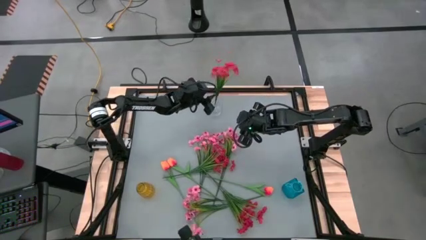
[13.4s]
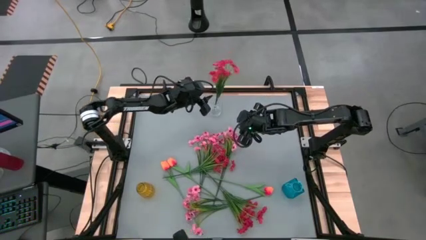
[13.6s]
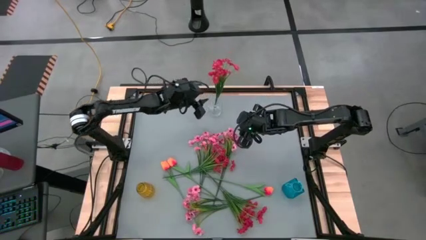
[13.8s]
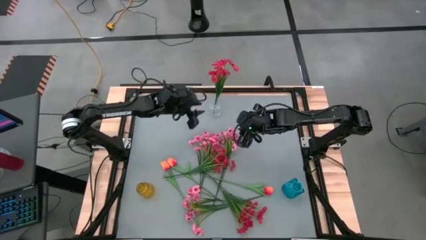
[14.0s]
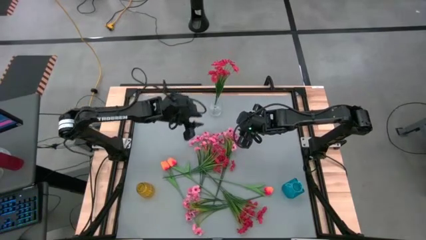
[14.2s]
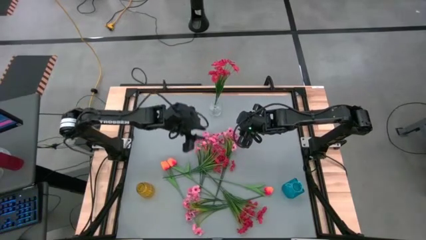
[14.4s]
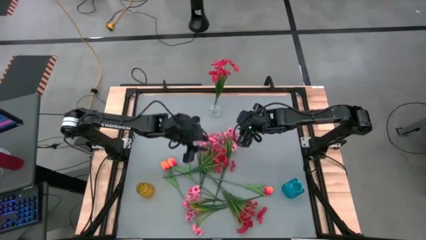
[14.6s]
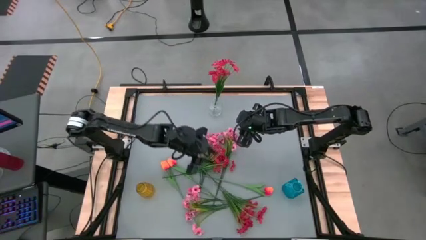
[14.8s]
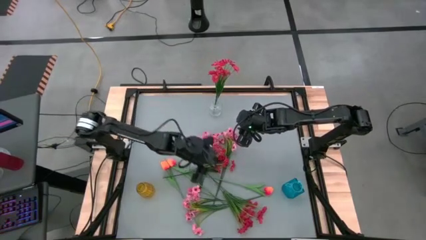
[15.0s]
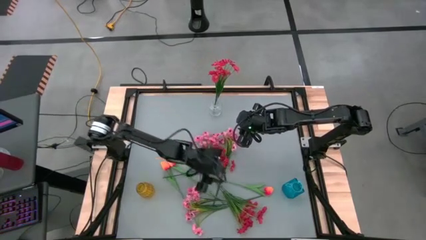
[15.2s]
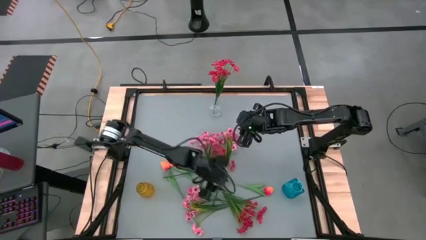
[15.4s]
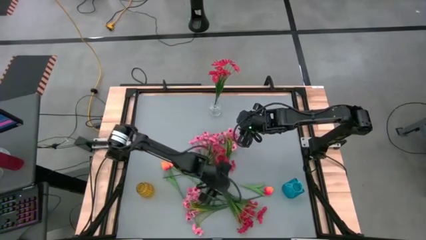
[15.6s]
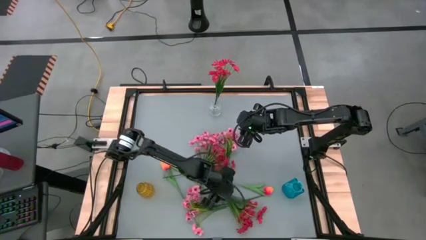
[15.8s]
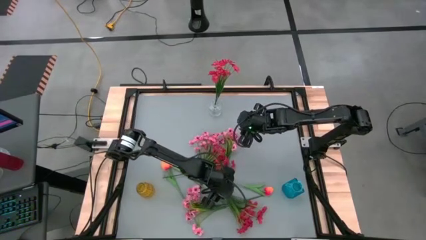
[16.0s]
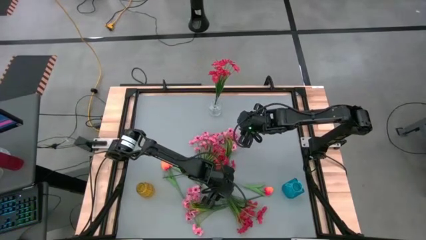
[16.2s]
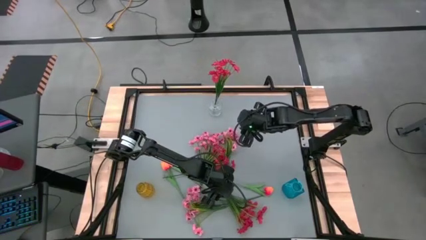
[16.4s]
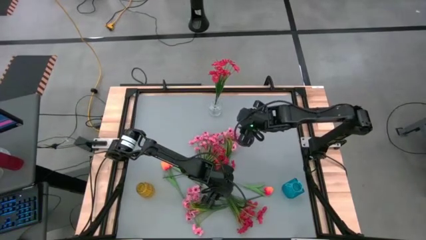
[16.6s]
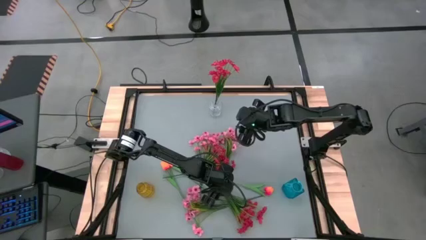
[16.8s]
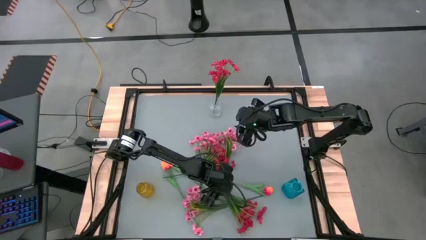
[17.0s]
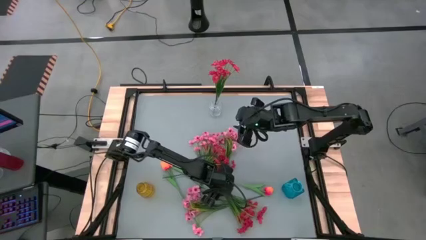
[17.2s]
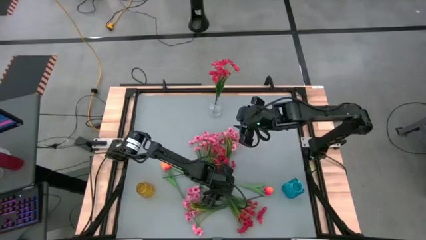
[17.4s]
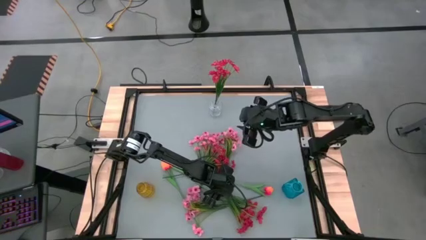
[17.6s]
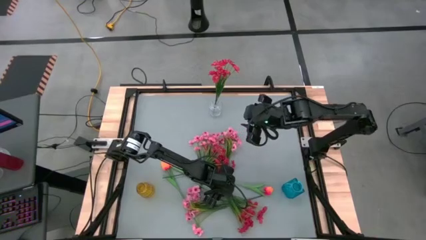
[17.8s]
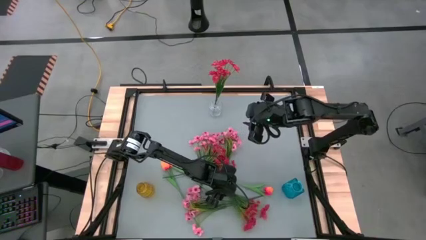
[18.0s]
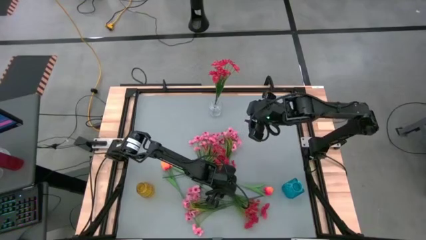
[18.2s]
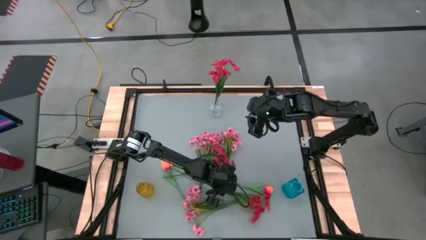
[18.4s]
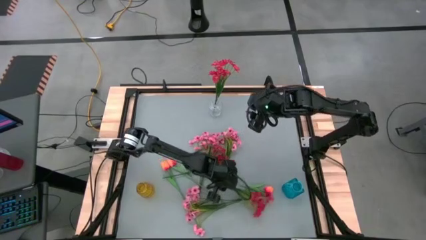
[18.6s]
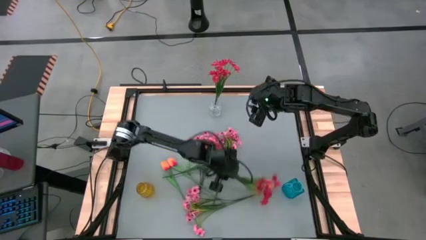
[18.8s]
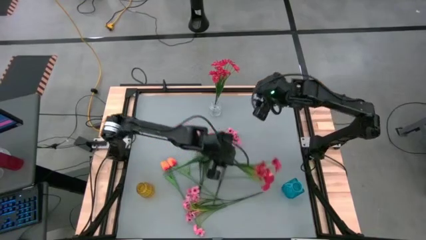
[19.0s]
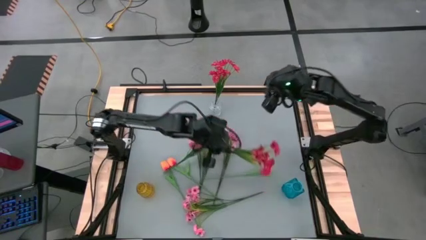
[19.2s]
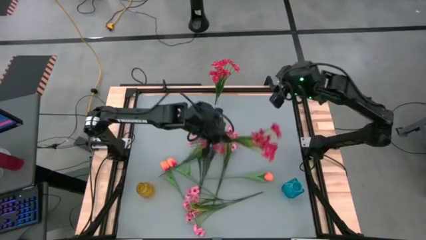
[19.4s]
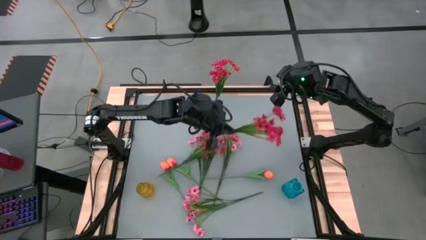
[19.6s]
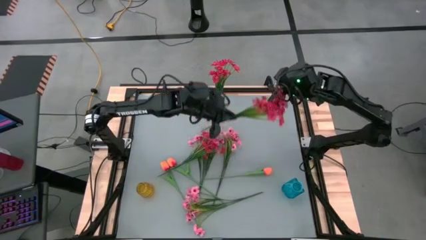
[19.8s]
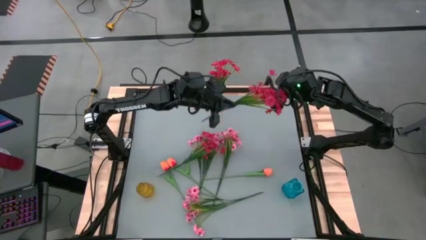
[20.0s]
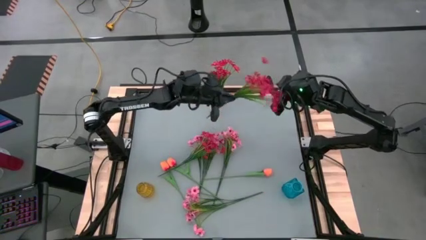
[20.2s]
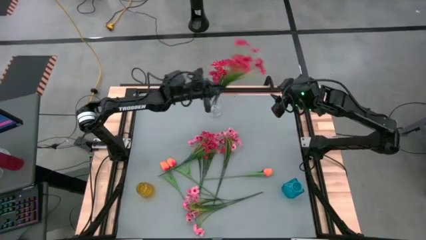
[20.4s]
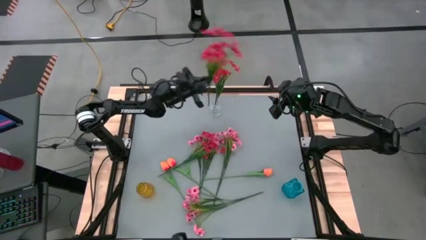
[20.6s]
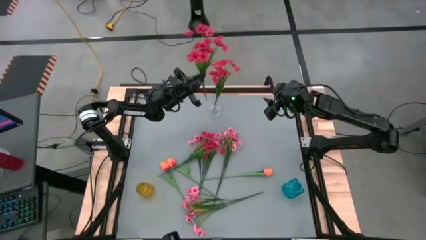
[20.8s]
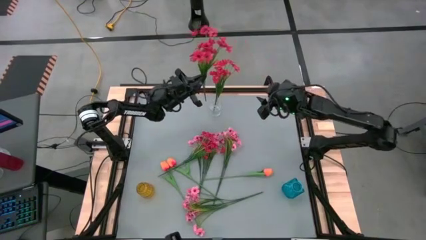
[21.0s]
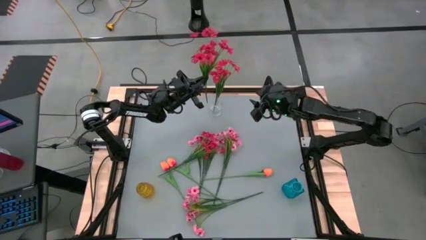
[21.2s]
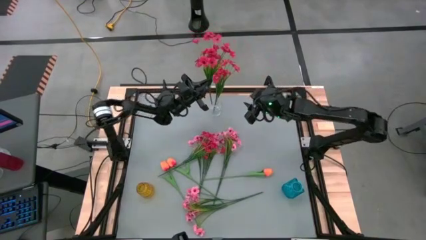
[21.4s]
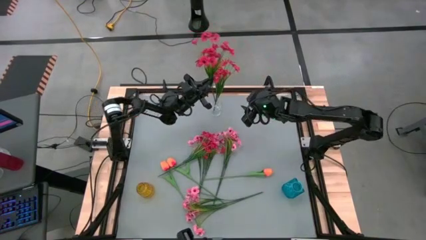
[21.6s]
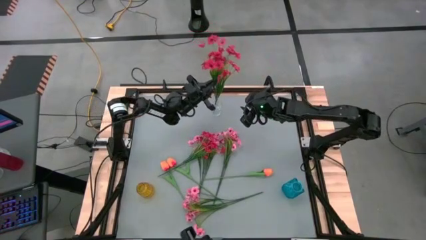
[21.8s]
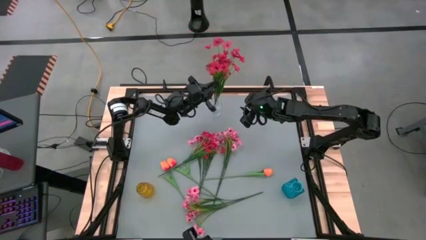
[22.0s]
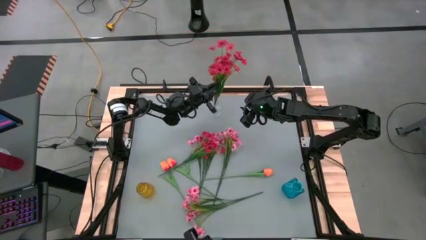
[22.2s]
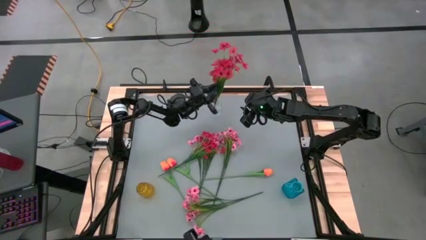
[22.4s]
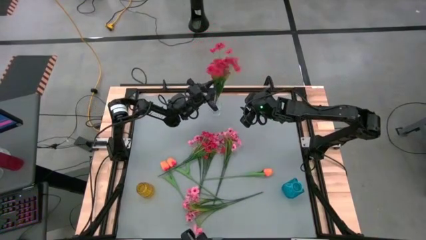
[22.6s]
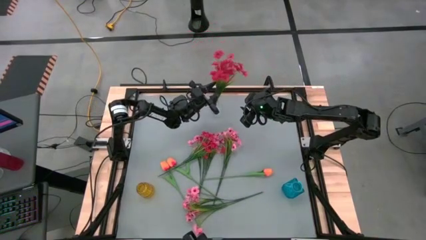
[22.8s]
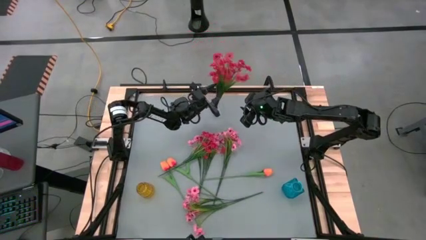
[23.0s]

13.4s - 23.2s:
Task: Sort flowers into vase by color
Put the bottom red flowers into the transparent vase

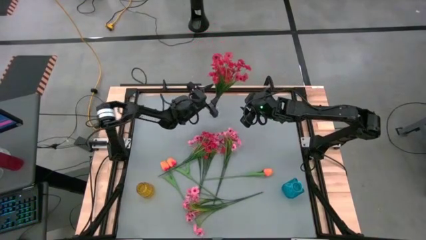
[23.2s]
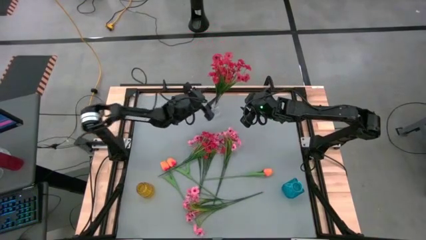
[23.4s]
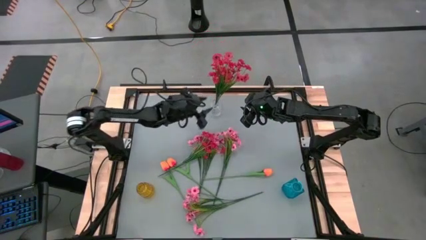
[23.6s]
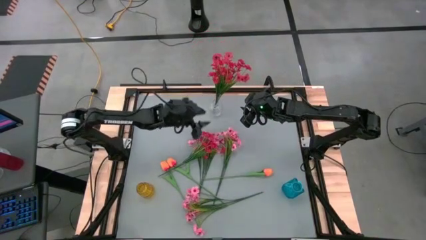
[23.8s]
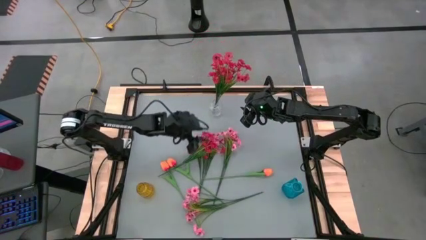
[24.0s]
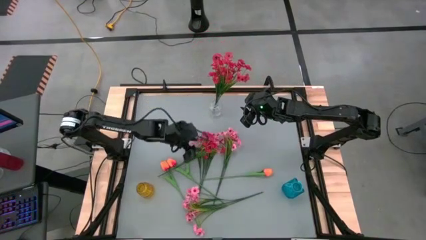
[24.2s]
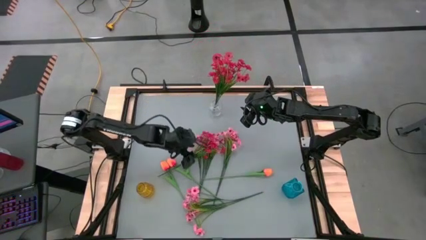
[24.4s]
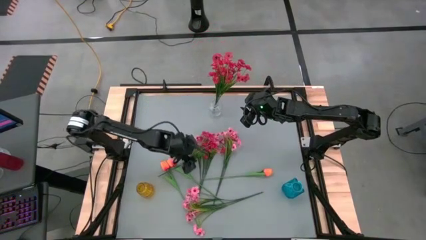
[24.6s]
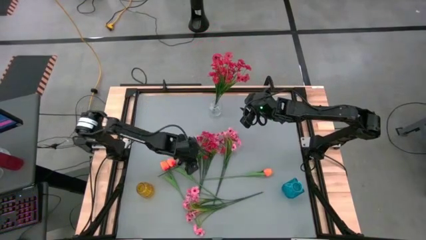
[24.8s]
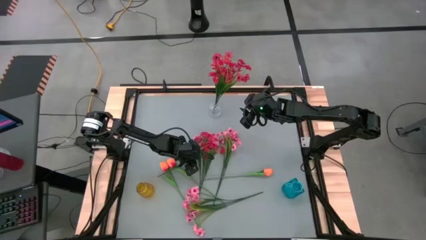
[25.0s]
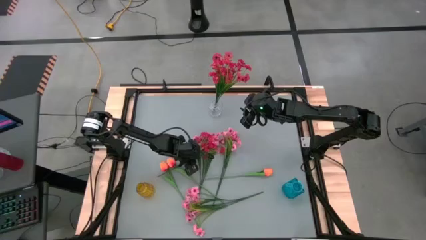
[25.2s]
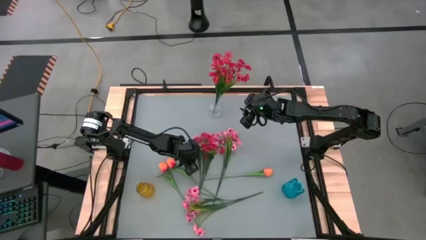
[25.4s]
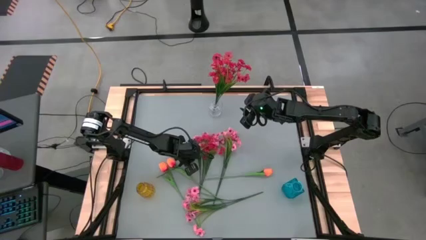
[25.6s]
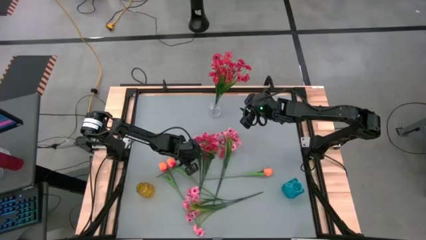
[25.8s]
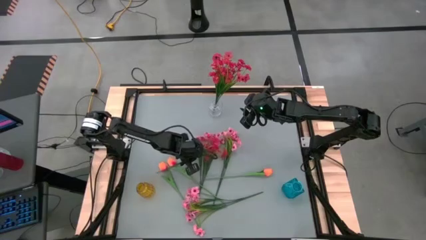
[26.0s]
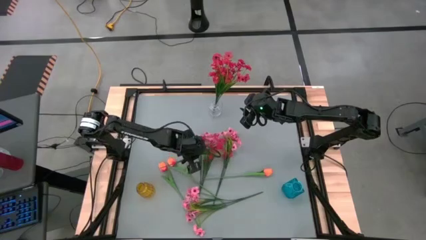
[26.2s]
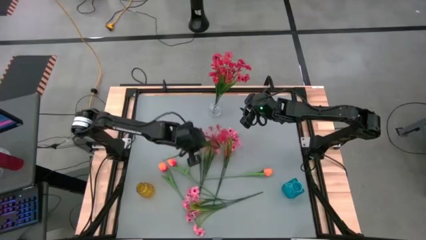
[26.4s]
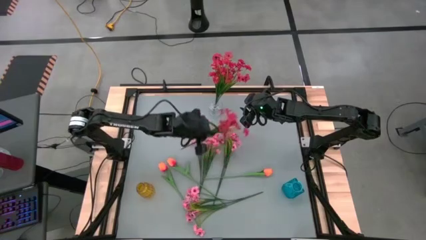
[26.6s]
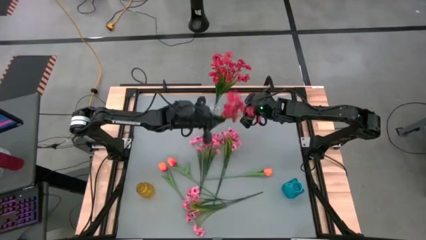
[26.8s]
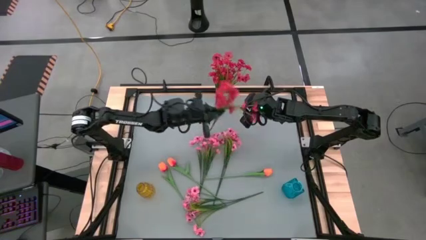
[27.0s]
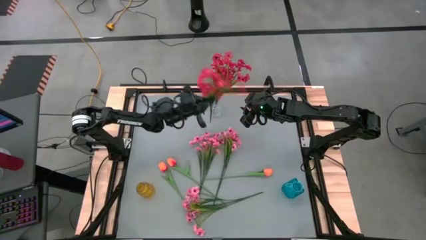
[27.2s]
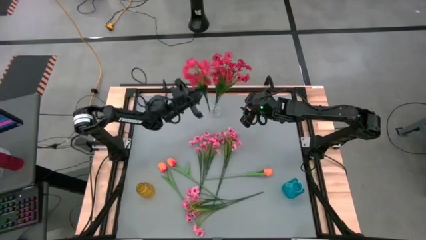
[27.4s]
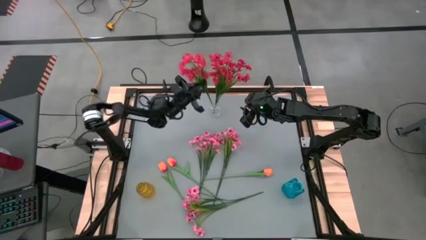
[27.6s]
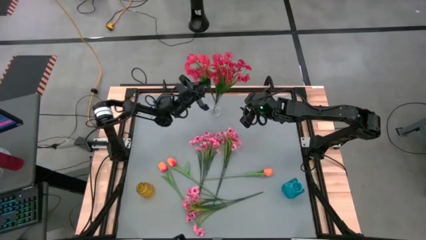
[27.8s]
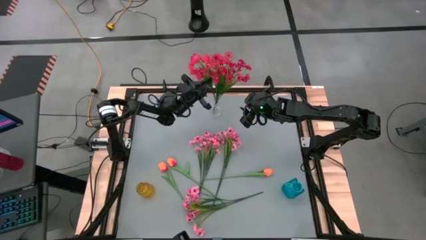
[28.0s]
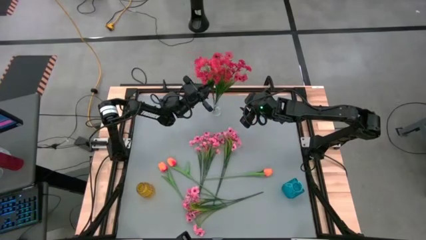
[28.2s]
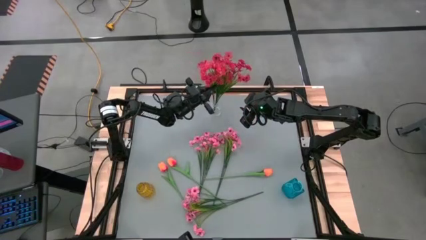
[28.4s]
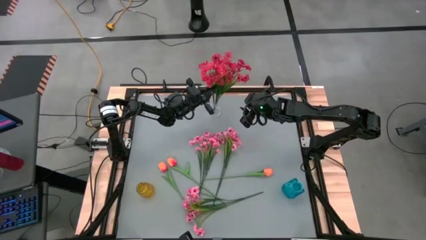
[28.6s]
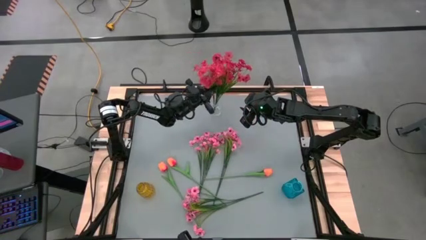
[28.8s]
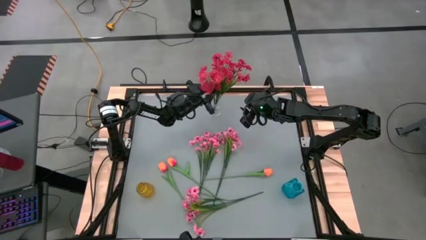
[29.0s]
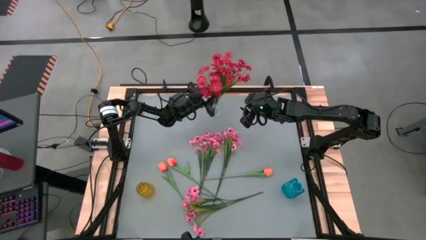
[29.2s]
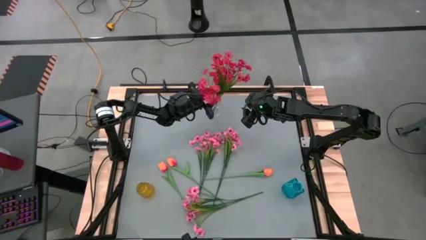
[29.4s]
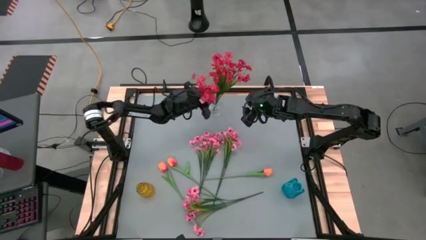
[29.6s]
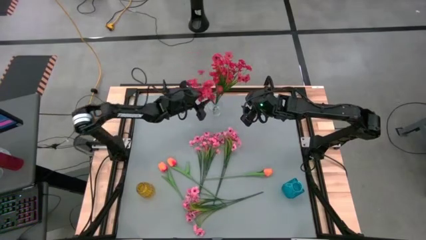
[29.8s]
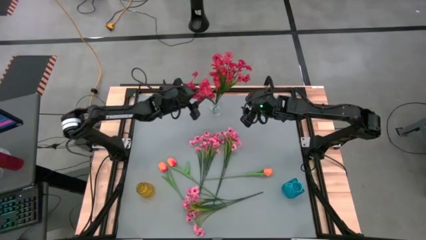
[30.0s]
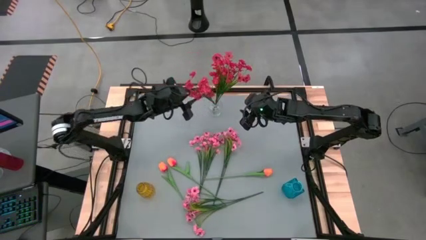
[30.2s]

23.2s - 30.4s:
Put the red flowers into the transparent vase
